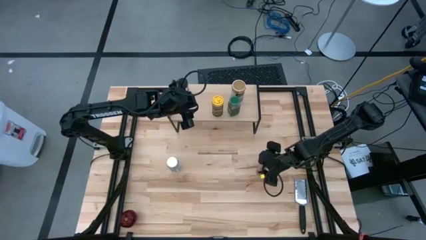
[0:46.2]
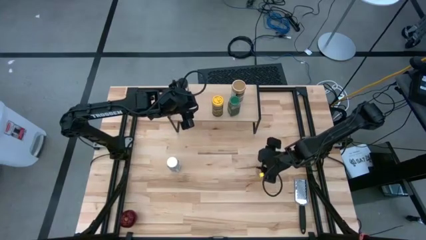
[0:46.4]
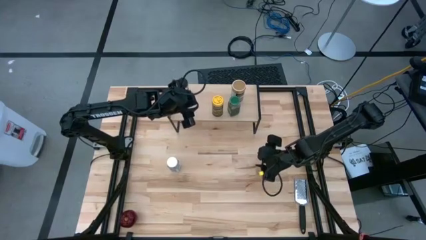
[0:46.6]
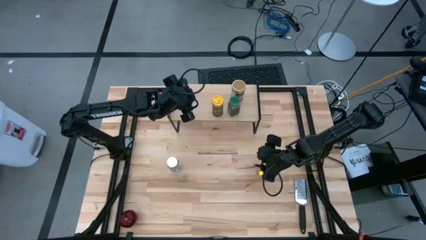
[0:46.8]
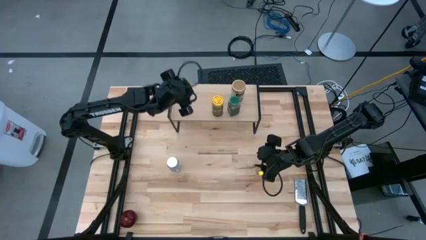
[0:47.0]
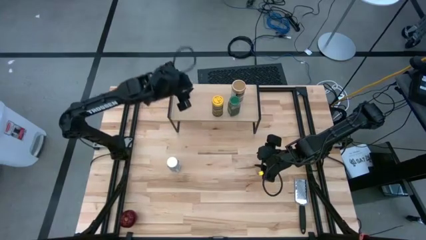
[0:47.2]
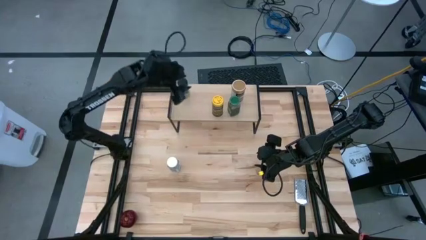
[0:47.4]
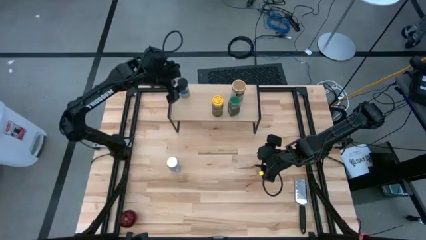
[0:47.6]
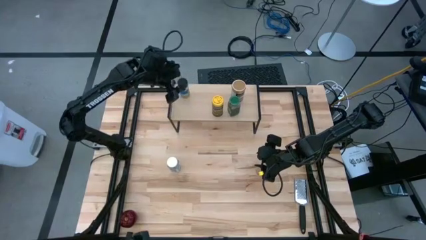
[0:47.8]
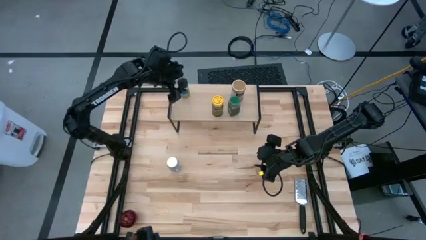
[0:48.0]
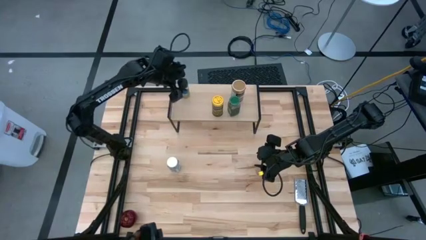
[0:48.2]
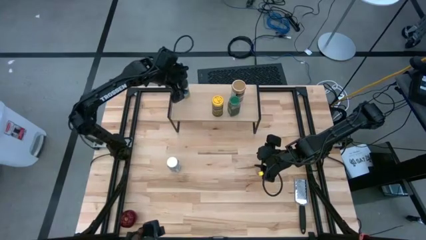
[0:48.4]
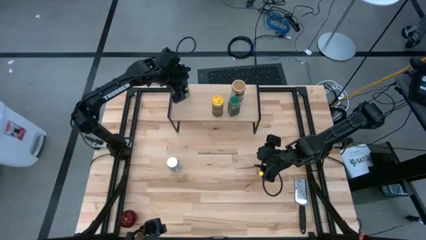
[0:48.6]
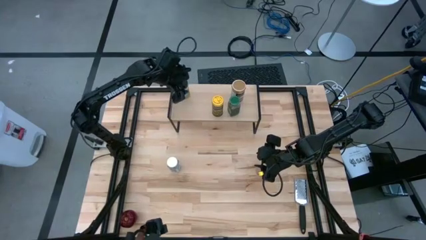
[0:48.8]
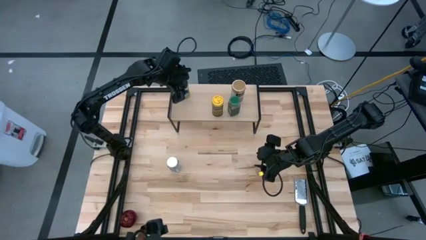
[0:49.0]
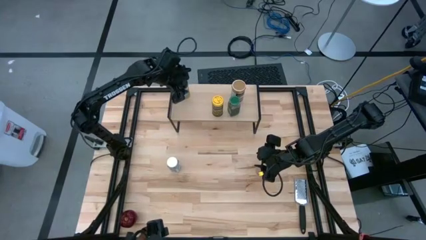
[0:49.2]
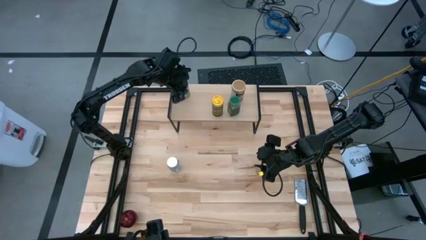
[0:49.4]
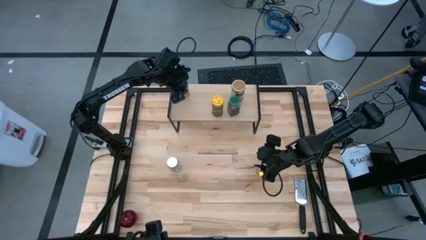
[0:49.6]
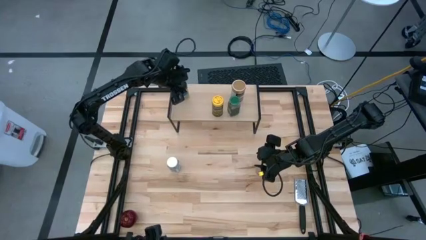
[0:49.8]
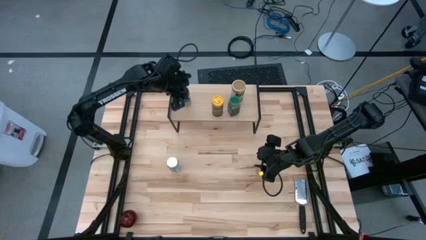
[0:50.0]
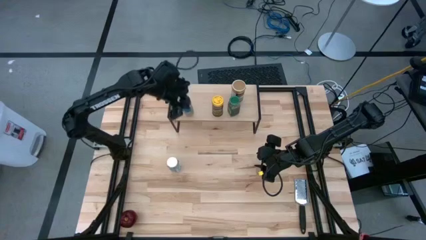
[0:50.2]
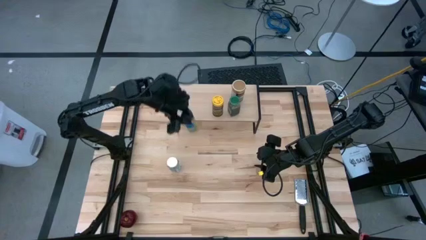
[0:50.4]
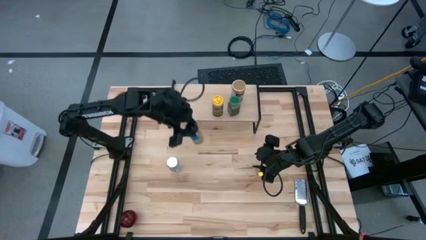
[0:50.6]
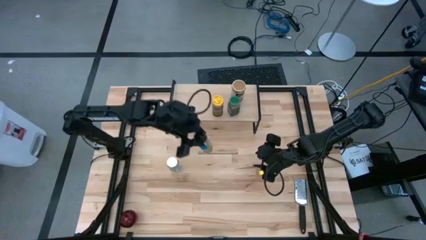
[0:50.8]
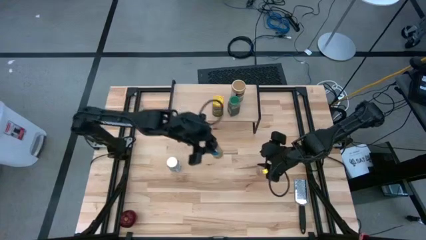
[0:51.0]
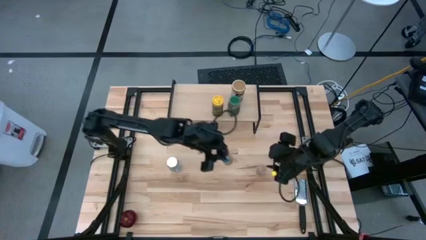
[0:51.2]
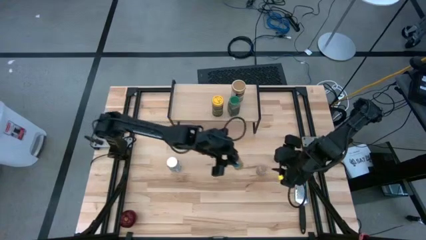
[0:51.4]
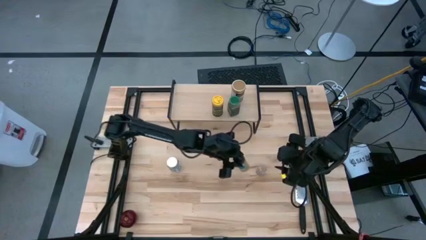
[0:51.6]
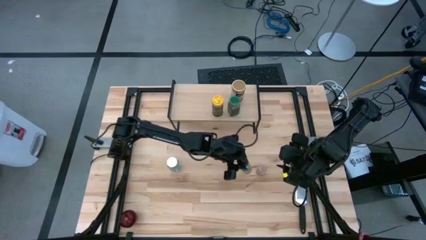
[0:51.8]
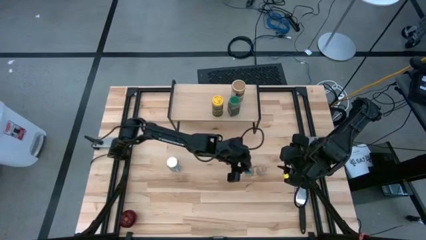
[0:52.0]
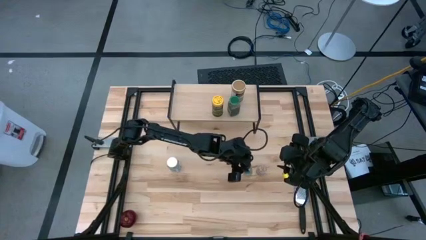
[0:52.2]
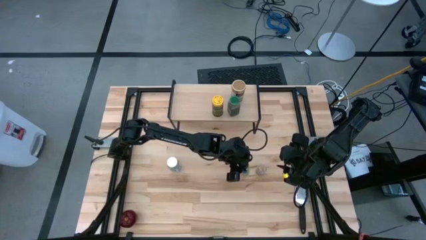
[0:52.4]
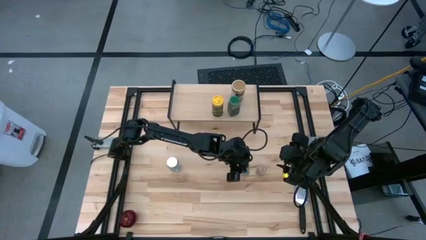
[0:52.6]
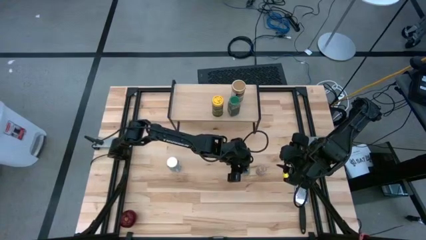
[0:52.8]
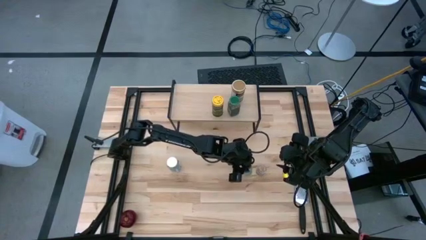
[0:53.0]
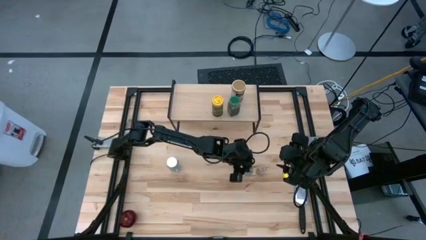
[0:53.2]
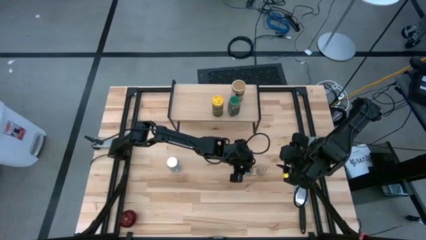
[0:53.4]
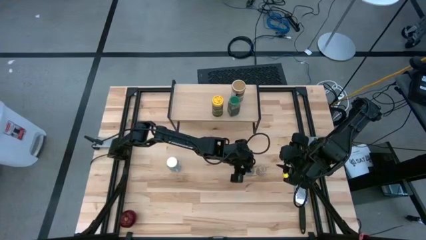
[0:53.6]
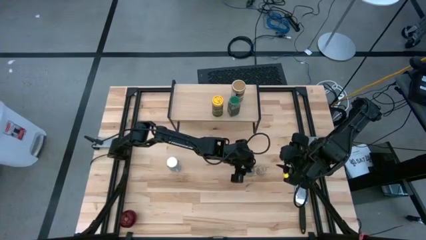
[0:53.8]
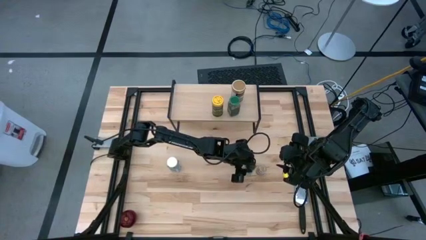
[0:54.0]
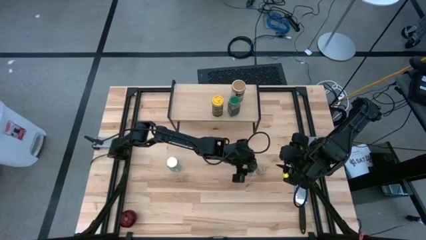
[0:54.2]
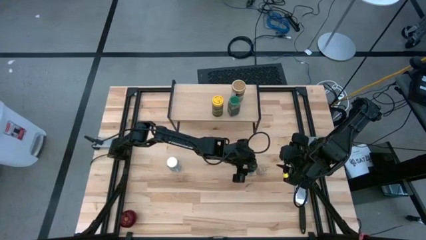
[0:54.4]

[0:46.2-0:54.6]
Task: Shelf spices
Remove the black seasoning bottle from the shelf
